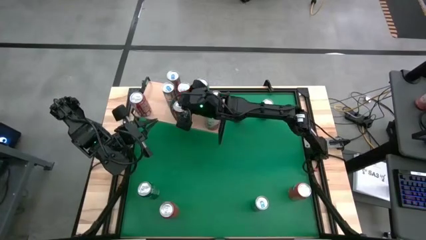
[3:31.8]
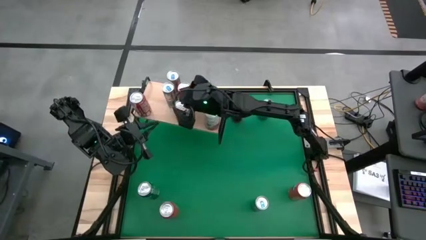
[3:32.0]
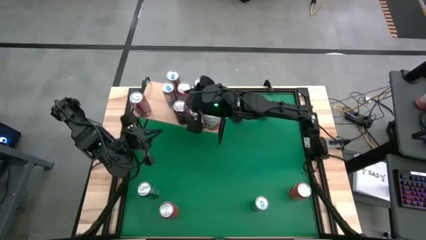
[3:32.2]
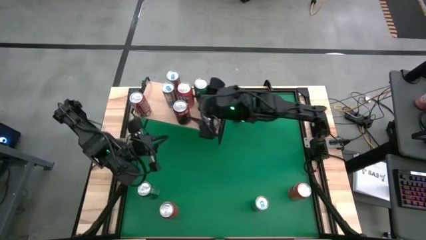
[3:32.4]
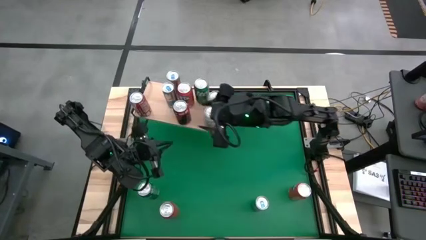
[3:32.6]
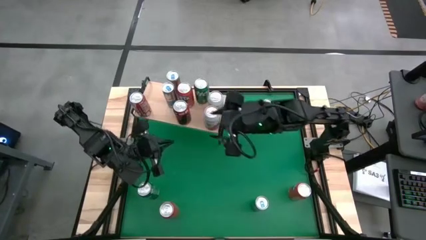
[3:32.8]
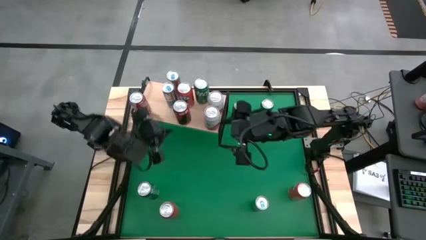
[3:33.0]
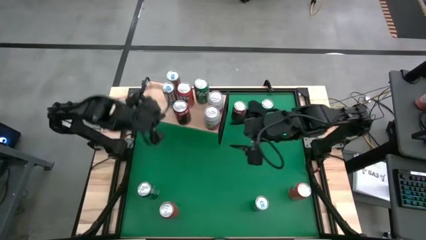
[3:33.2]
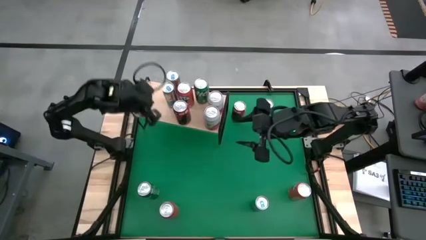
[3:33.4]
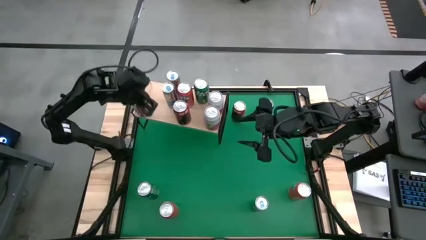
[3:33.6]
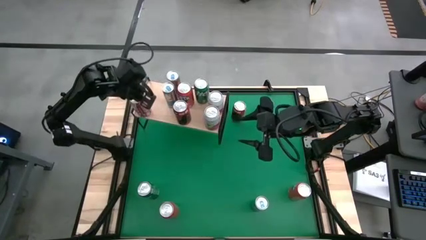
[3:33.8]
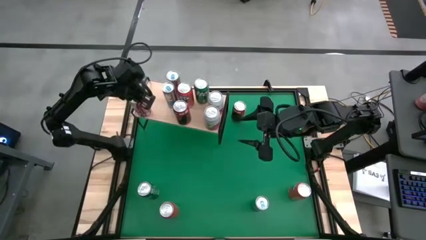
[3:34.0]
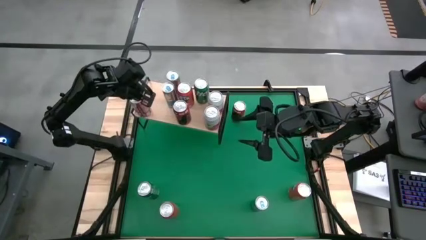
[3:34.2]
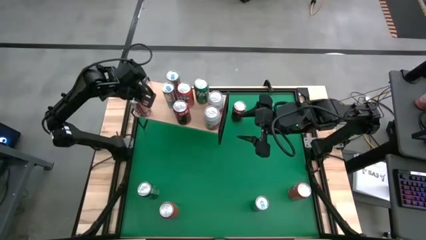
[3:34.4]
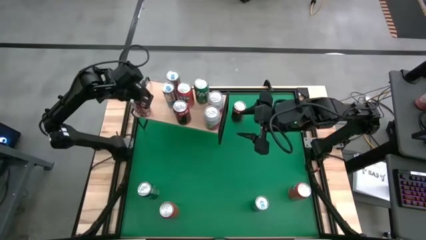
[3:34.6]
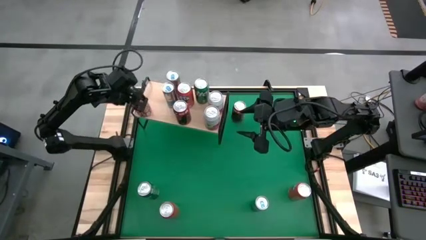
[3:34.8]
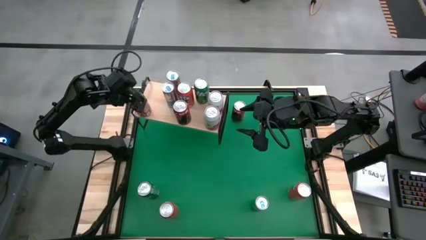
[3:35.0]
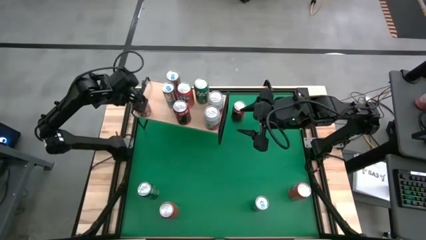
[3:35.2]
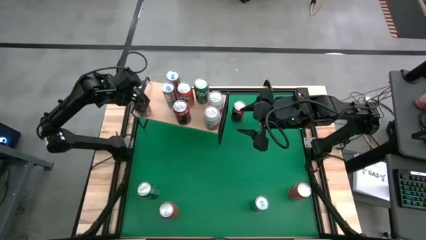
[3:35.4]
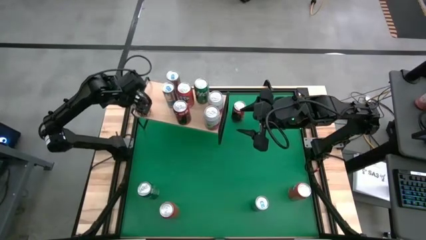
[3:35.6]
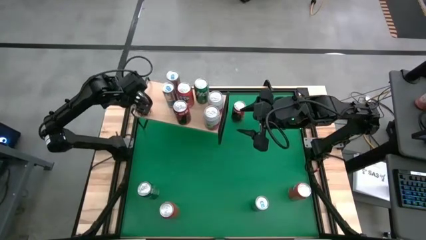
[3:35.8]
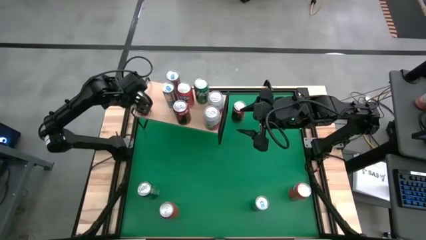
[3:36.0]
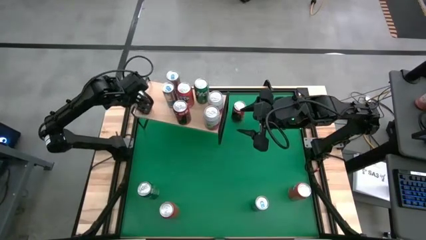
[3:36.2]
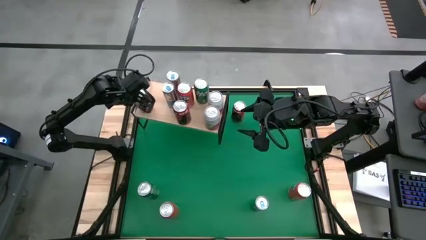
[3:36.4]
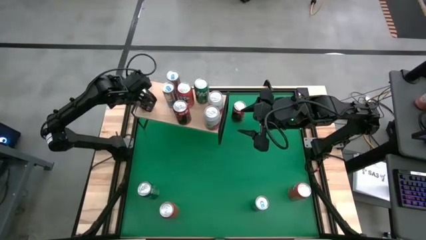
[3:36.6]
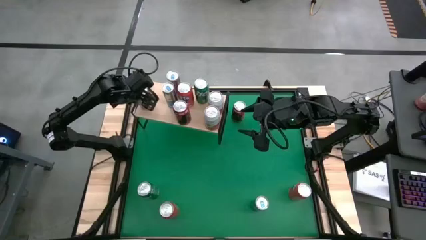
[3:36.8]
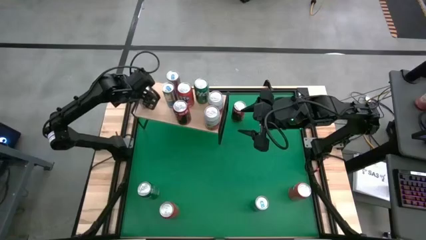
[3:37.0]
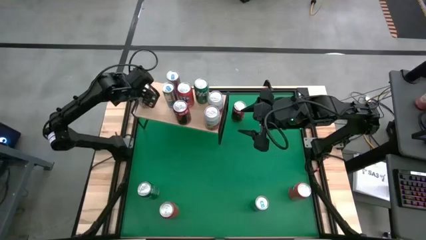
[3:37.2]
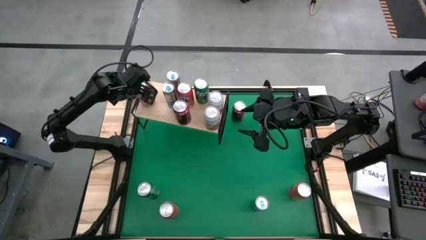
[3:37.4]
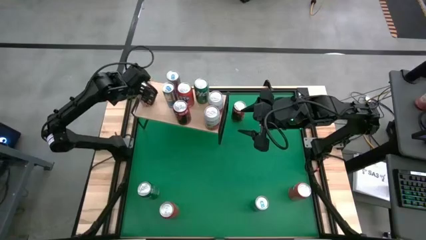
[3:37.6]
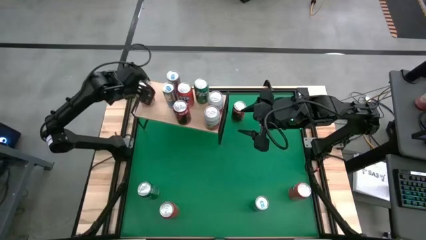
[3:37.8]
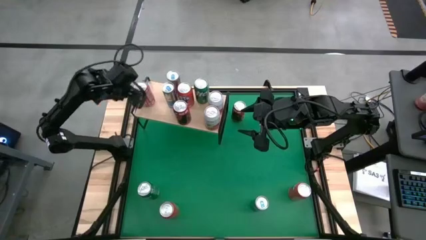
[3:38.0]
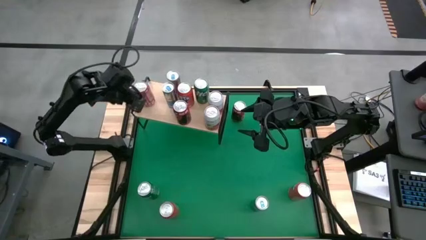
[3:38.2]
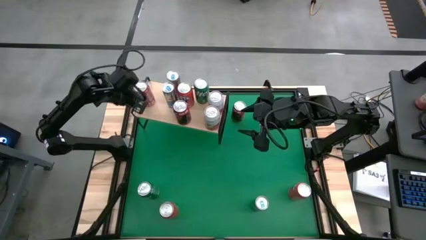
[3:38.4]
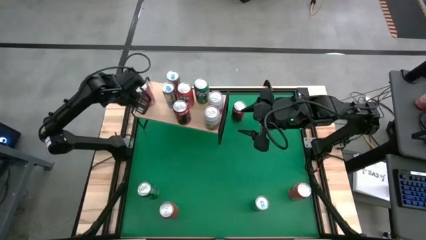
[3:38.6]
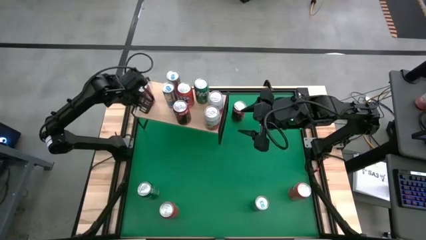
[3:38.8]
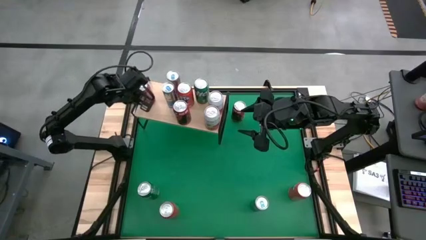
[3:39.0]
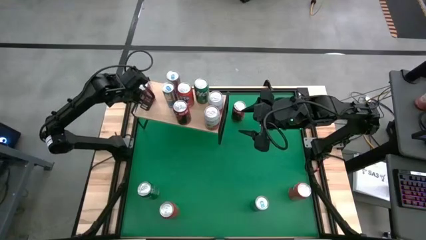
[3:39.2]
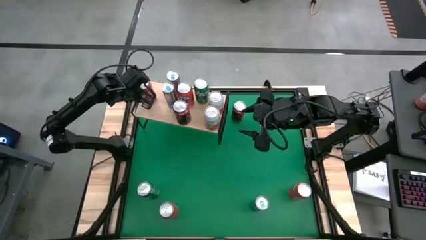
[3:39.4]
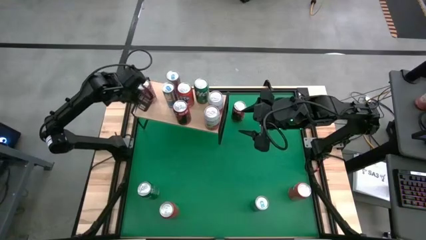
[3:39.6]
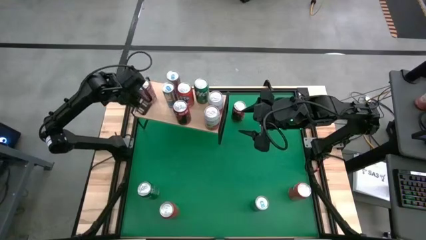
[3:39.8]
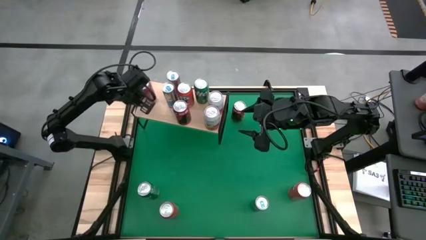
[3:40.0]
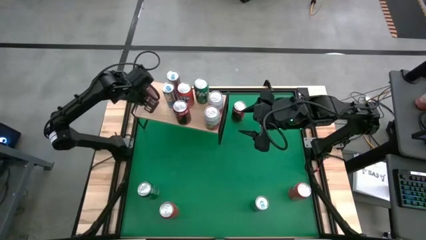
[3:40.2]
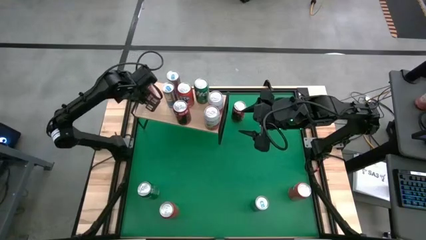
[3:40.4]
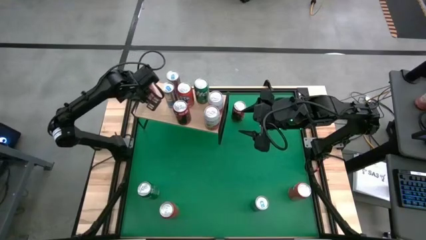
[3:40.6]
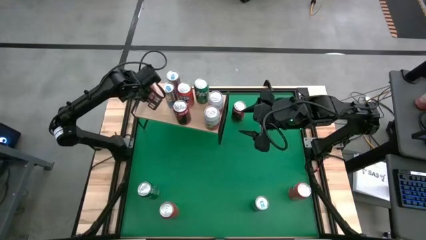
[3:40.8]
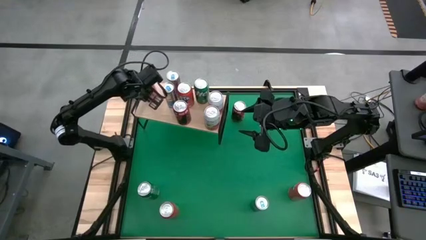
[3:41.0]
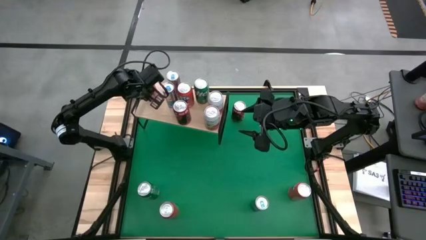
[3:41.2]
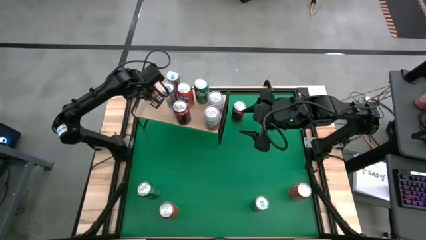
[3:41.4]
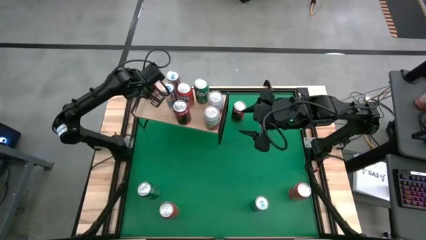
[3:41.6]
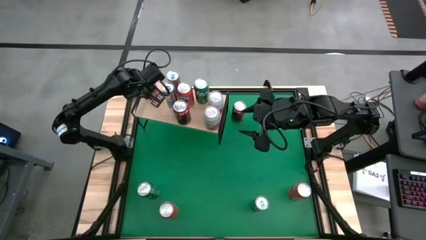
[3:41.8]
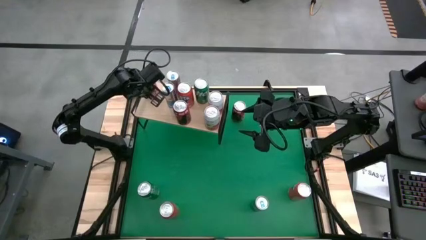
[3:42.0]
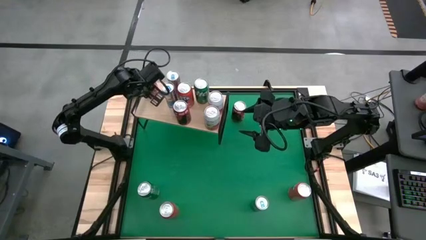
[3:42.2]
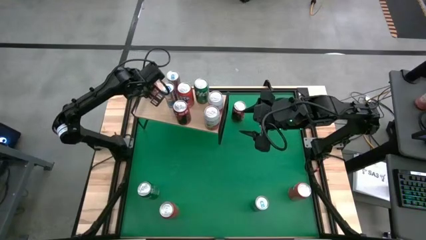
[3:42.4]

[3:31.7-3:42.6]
Task: Place canned beverage on shelf
Adjust the red/black soda can on the shelf

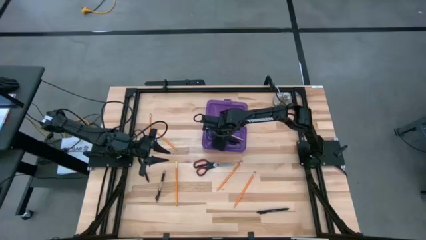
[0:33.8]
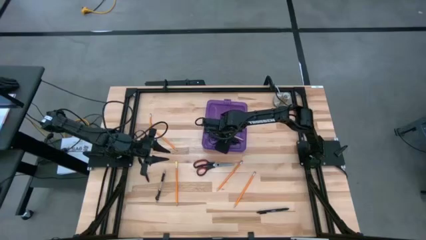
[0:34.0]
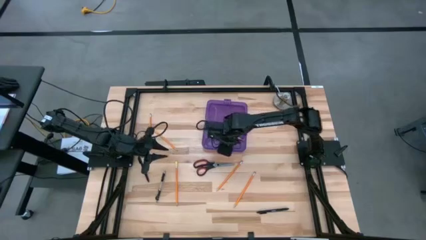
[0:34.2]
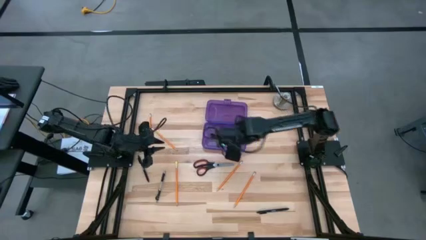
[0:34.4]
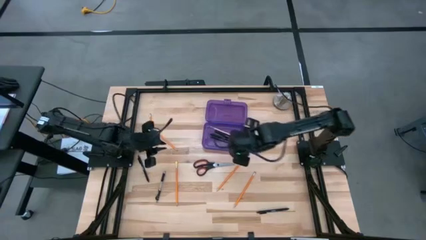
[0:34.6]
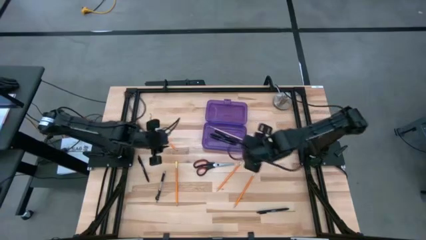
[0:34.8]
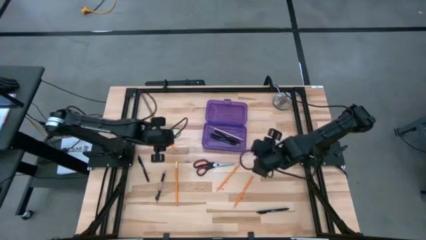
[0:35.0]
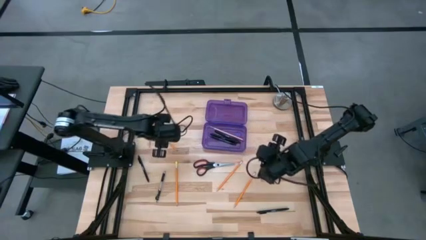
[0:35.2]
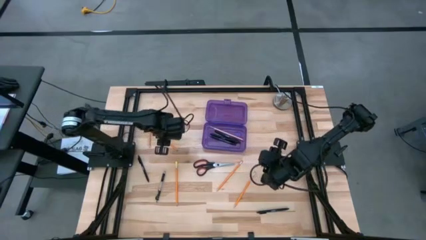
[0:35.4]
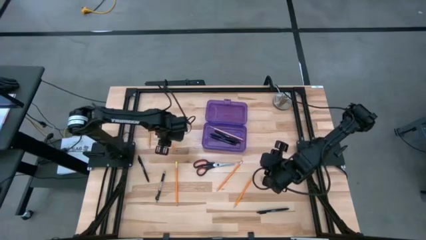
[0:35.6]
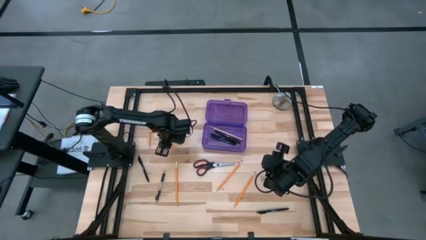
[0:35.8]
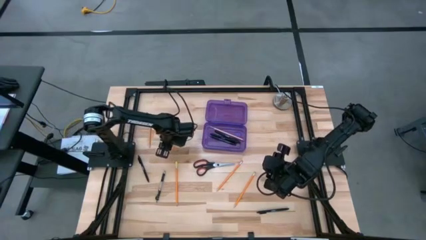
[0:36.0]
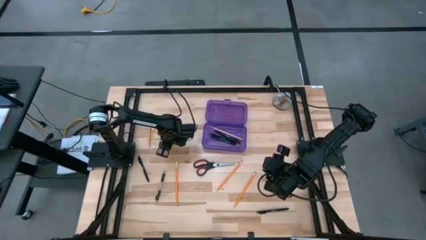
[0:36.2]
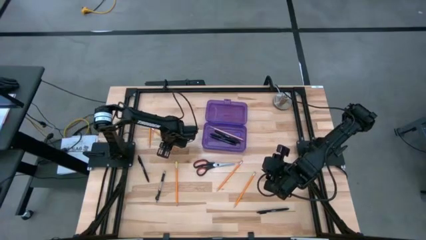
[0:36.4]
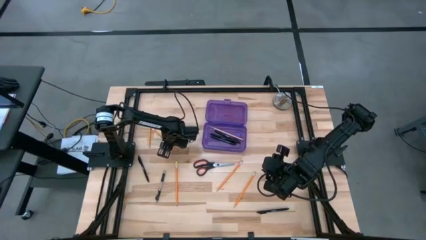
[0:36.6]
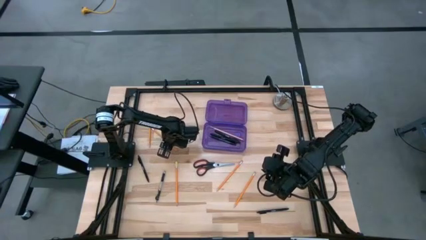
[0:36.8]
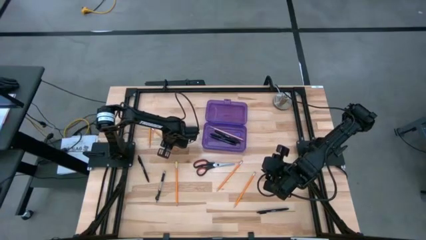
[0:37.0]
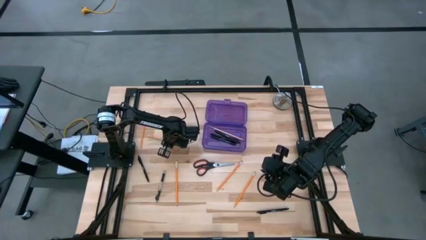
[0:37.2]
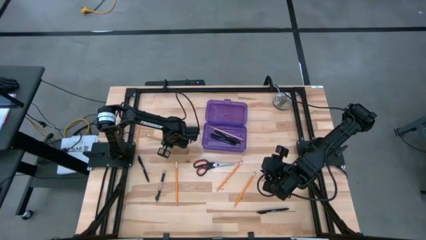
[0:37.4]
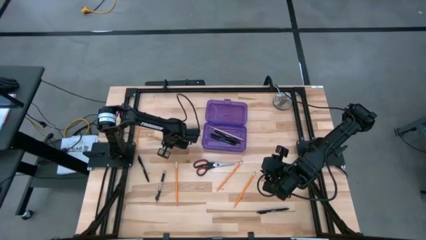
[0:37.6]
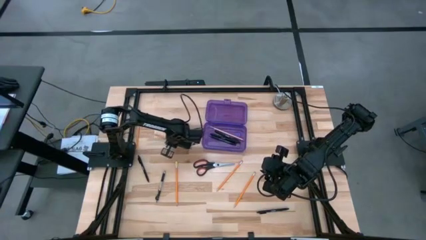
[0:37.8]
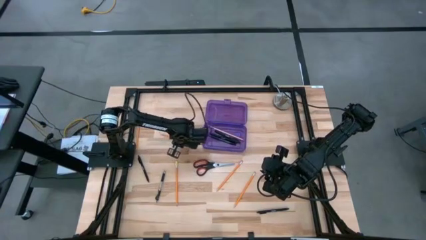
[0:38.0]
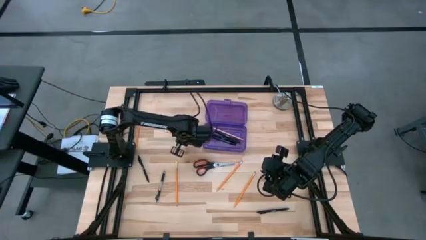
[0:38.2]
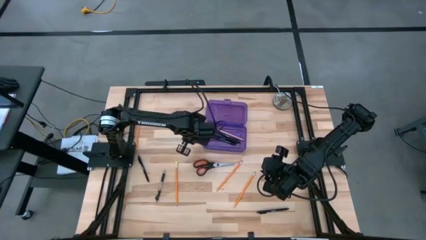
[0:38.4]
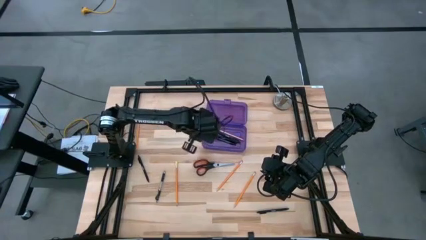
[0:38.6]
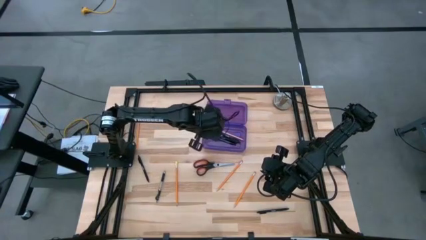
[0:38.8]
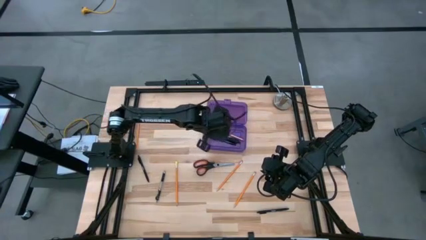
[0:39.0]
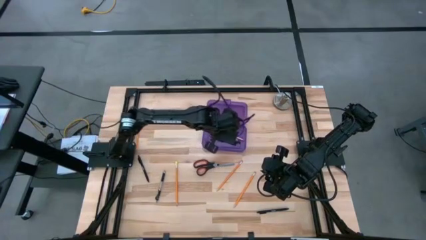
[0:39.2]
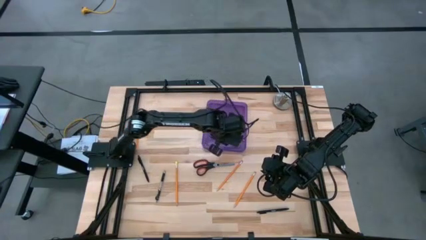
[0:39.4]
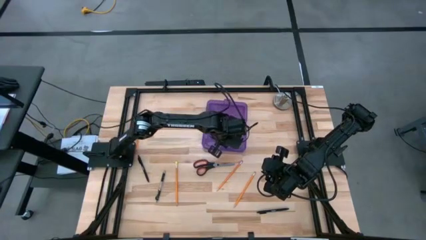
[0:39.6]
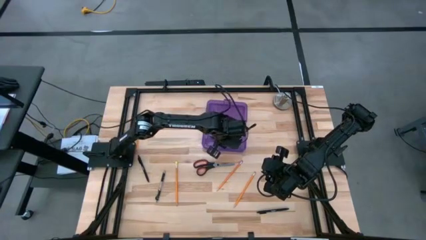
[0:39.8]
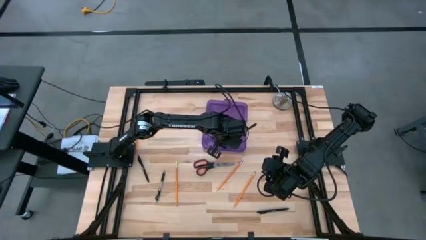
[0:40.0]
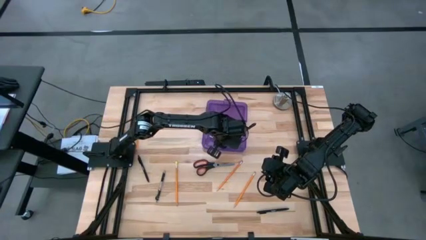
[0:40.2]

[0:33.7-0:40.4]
Task: Pick & place school supplies into a supply box
Put the orange pencil into the pencil box
